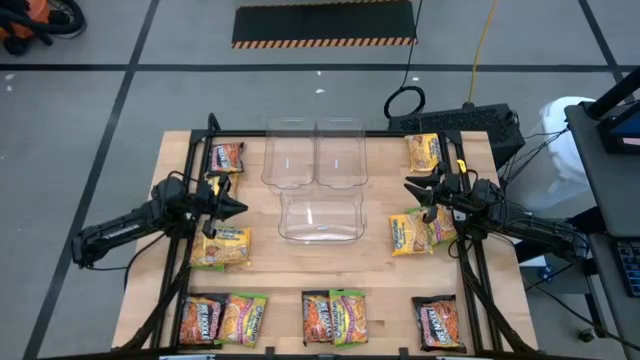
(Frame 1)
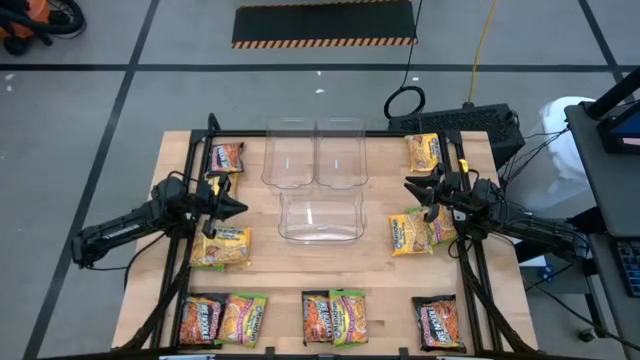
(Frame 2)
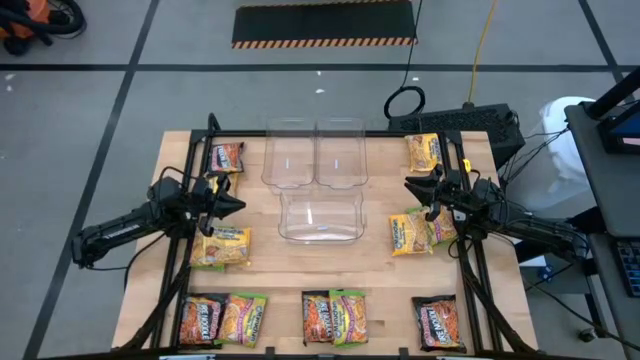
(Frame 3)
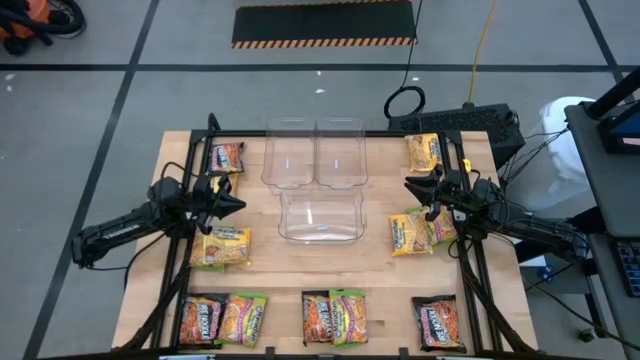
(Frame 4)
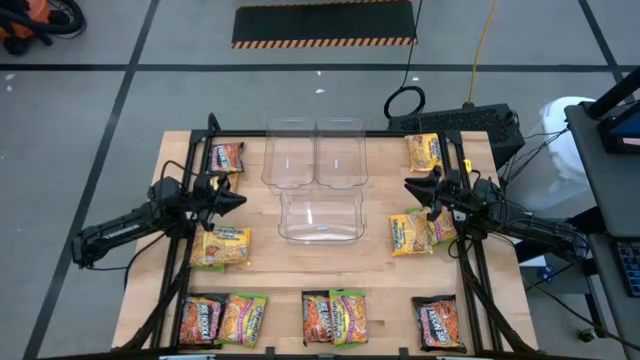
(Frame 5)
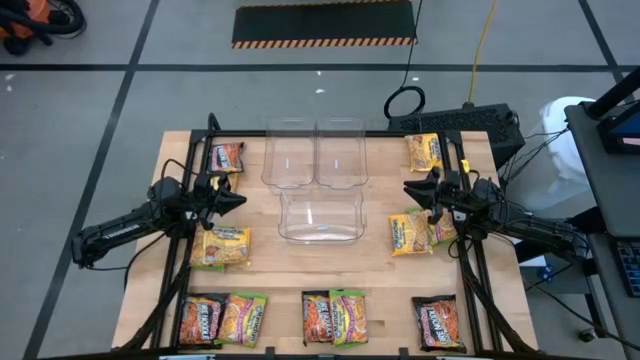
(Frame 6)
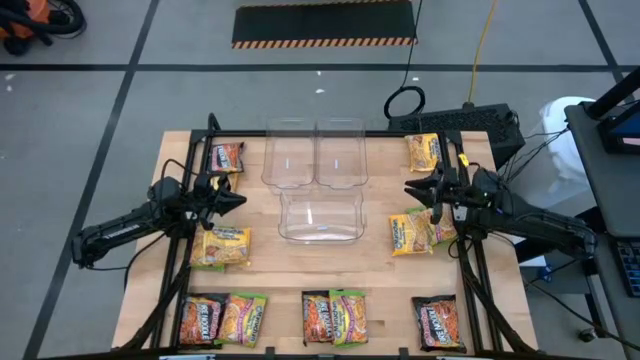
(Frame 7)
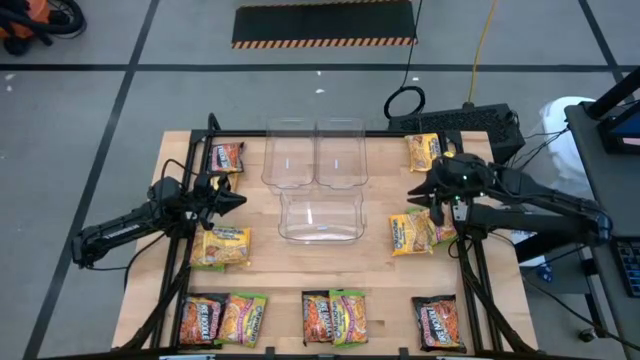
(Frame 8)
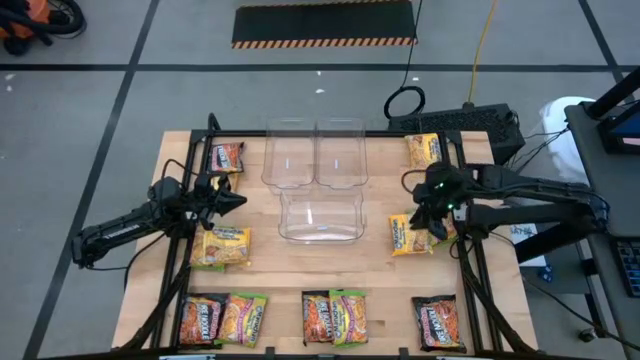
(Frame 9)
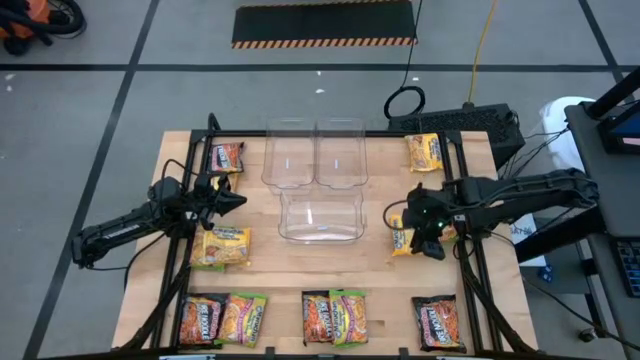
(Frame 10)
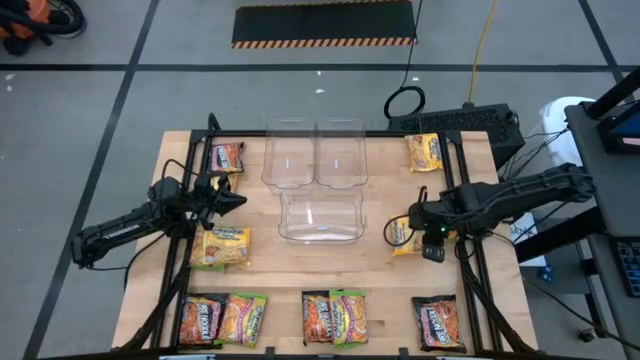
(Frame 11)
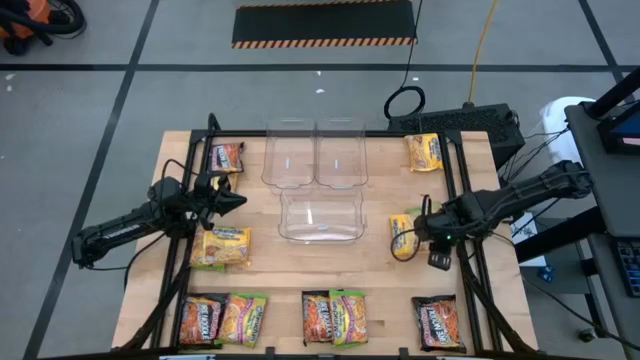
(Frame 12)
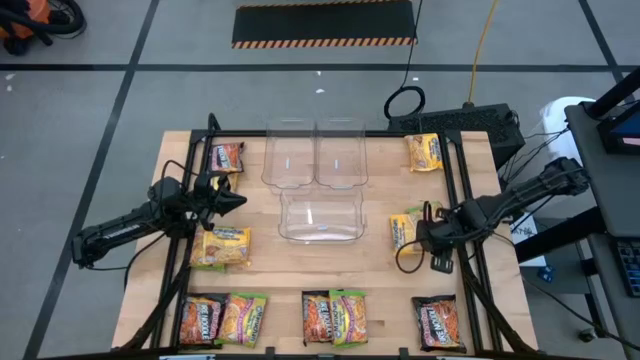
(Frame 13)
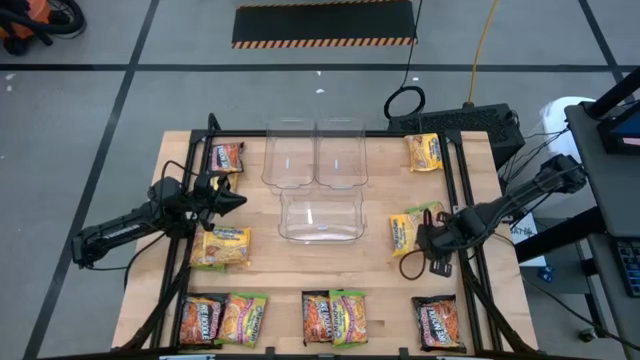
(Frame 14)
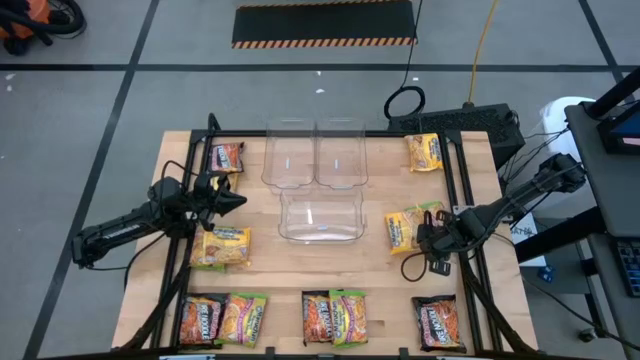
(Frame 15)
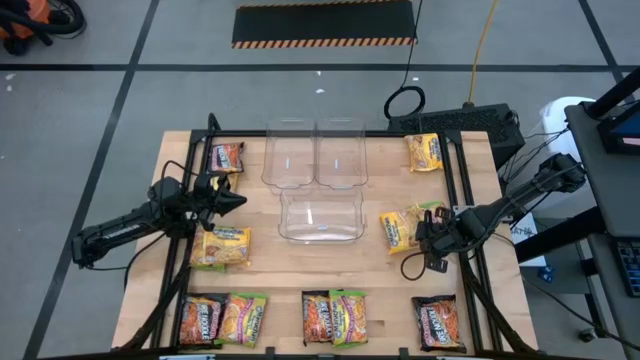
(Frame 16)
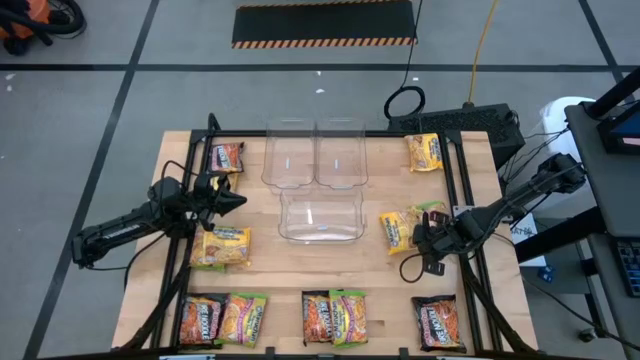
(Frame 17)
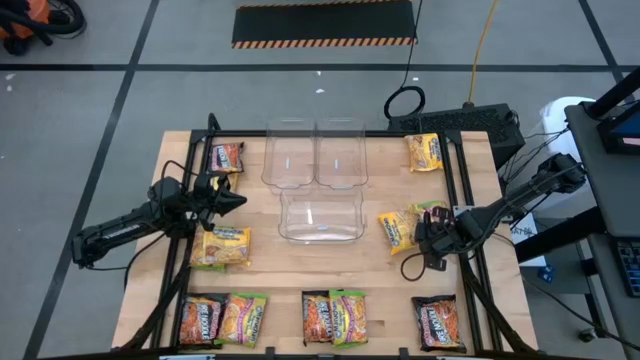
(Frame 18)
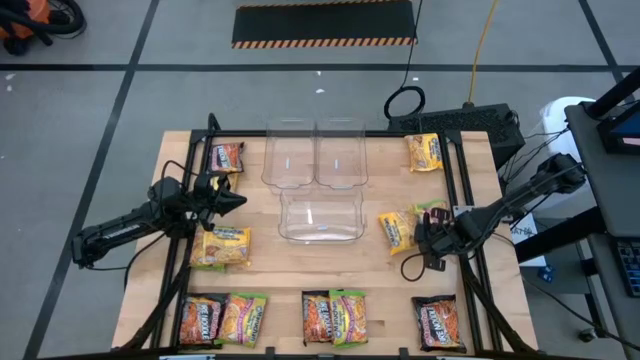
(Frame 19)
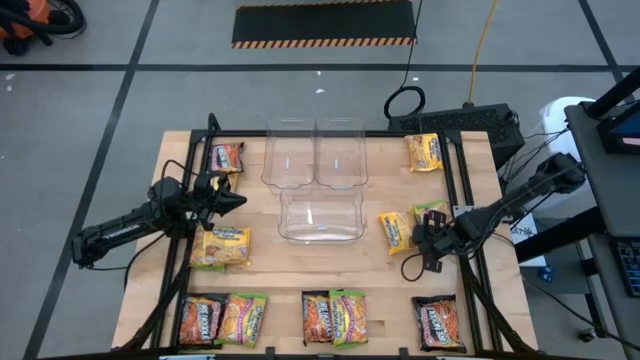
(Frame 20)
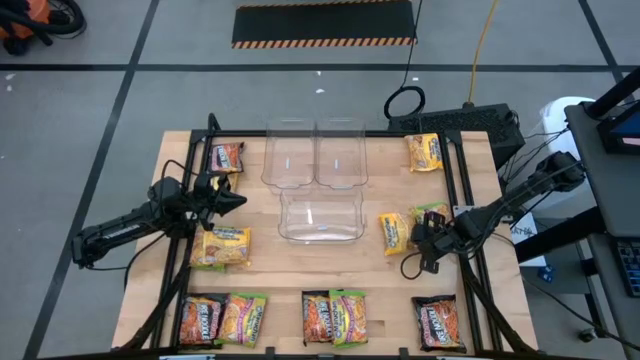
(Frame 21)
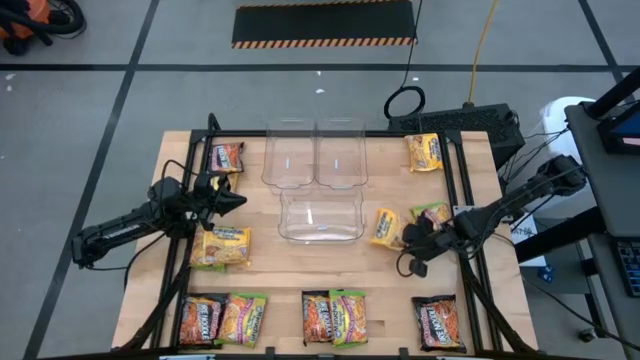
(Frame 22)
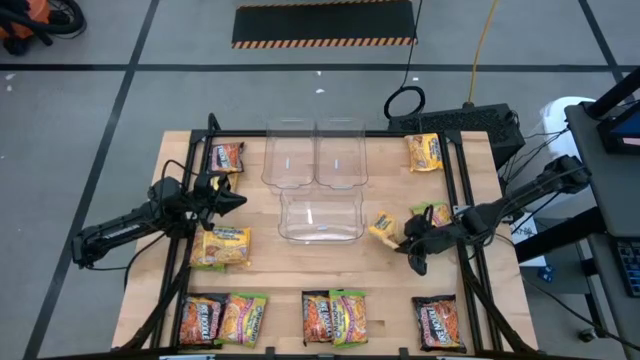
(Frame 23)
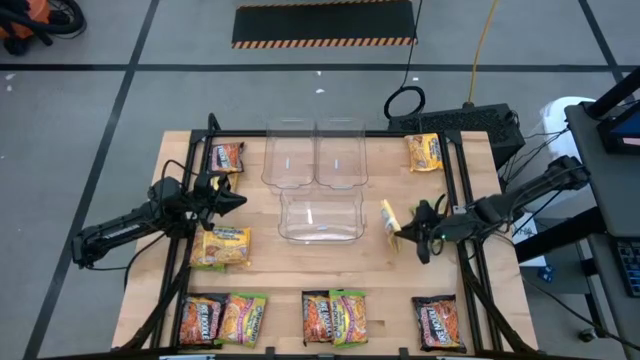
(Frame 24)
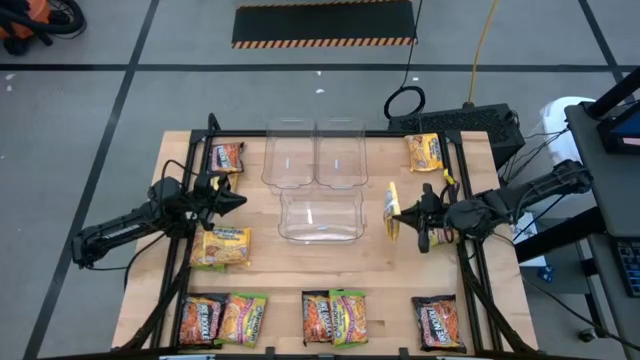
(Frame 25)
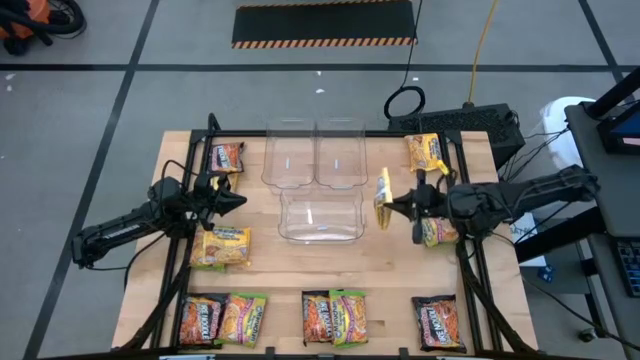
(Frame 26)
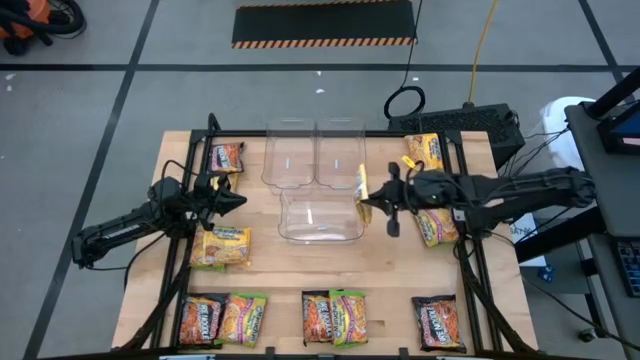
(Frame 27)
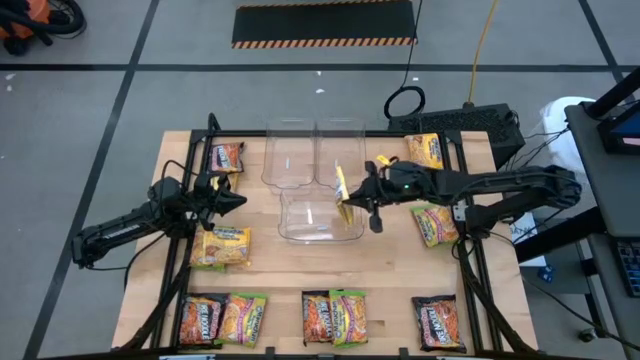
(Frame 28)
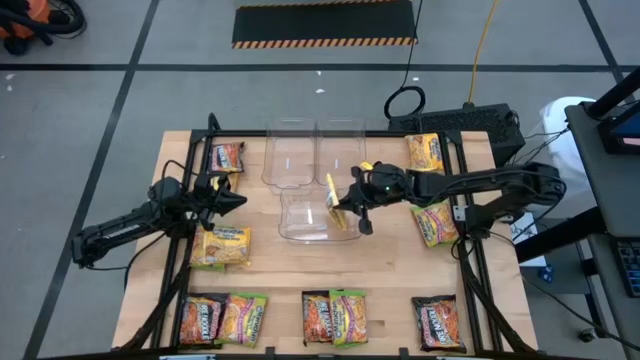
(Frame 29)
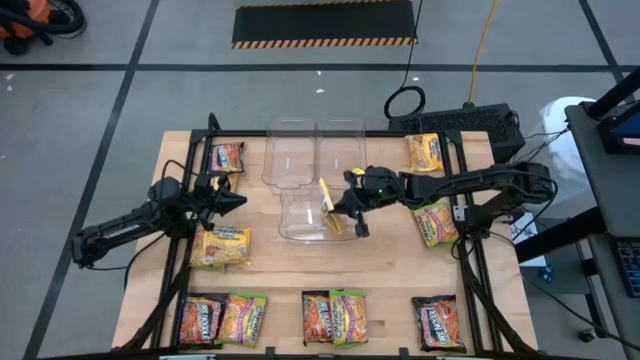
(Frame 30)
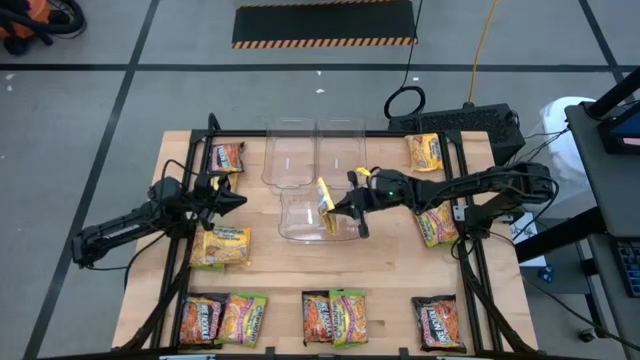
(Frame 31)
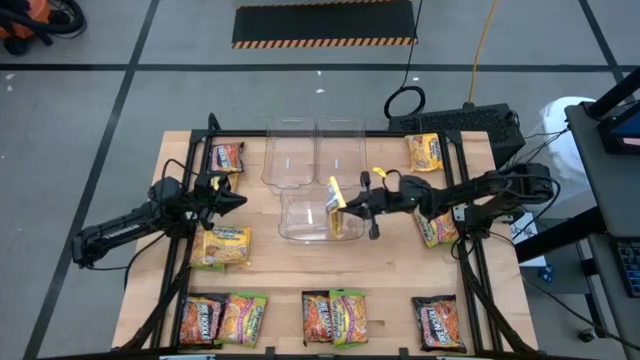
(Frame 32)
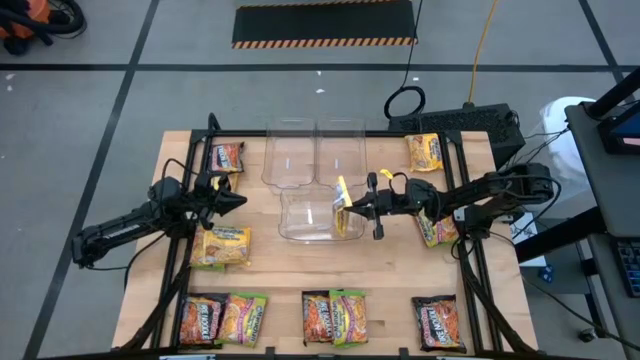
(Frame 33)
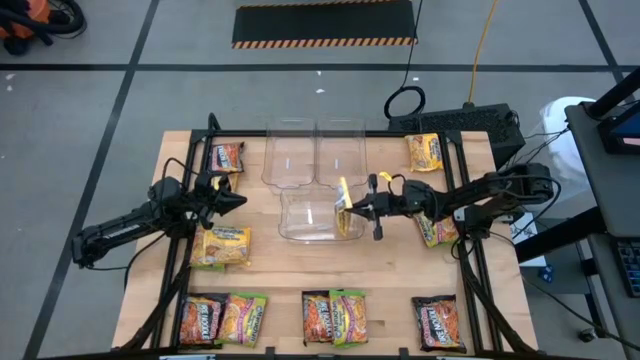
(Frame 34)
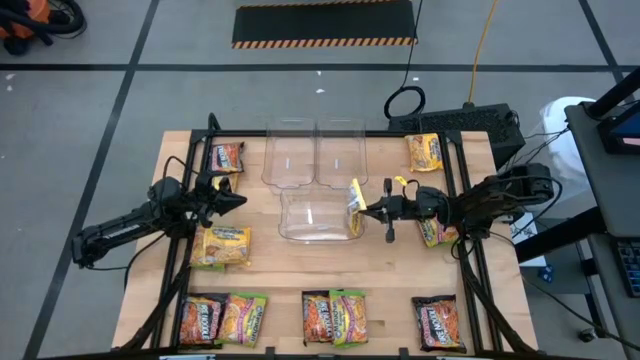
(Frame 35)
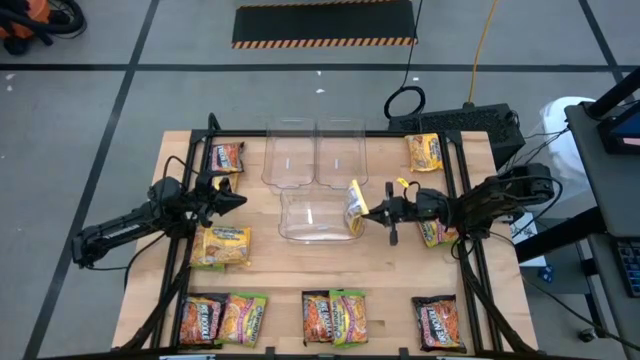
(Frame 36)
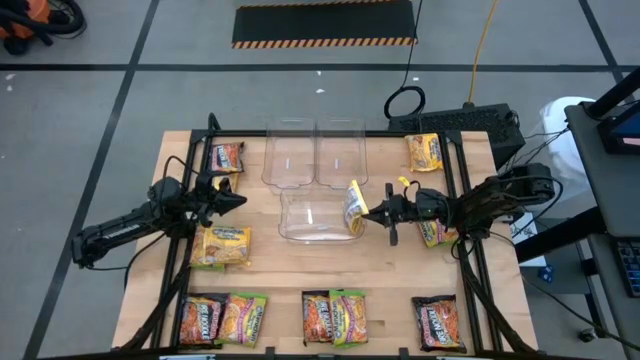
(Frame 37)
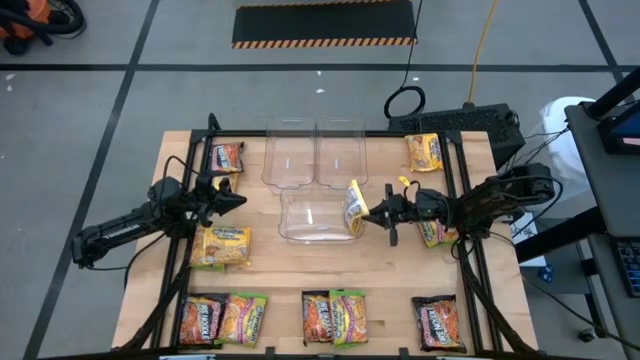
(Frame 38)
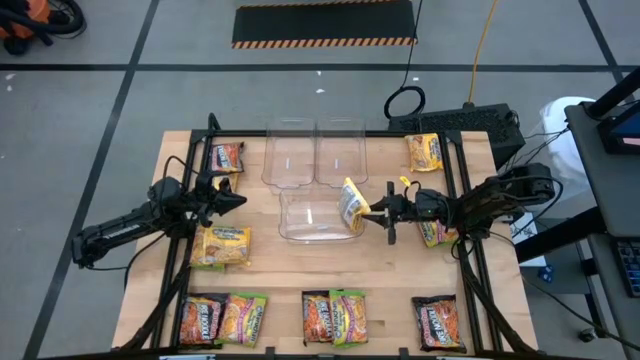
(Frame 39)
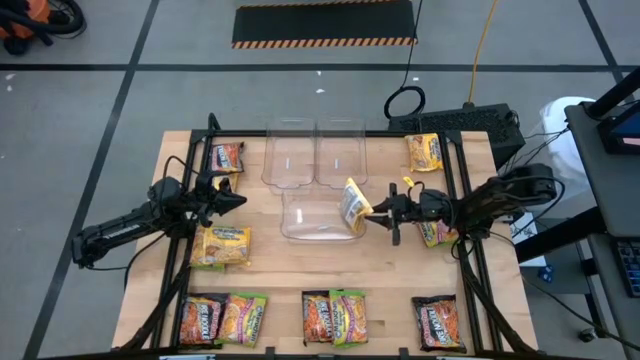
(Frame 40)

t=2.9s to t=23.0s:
Task: Sort Maruchan noodles
Put the yellow noodle pack into the bottom transparent bin
